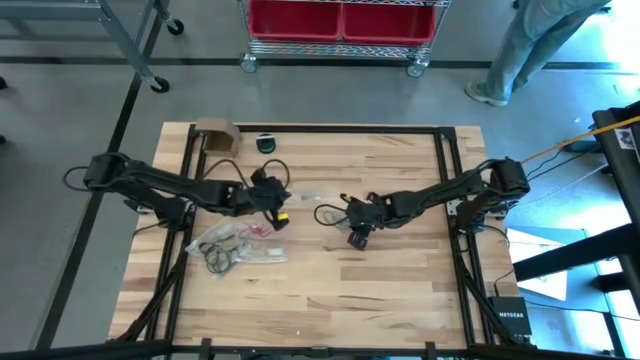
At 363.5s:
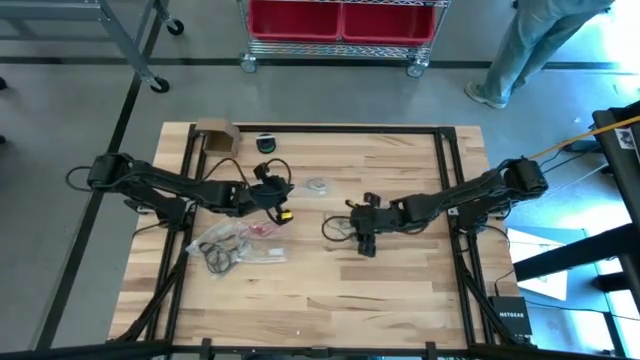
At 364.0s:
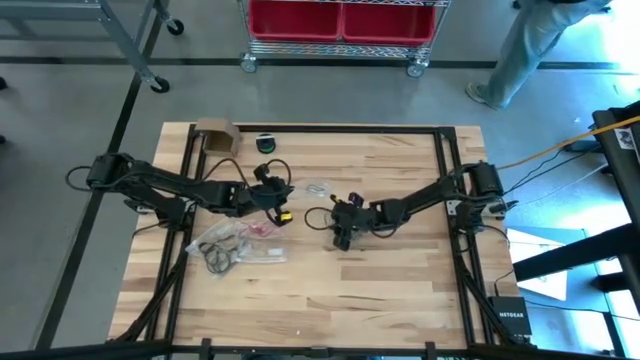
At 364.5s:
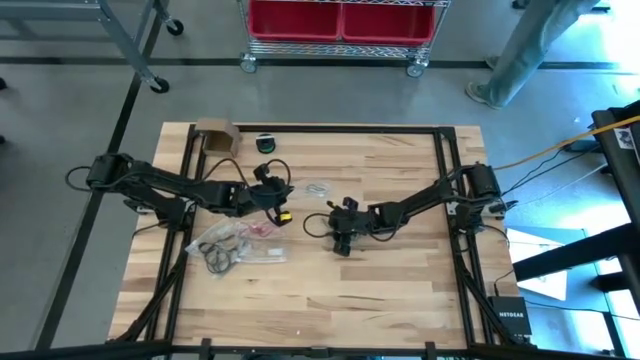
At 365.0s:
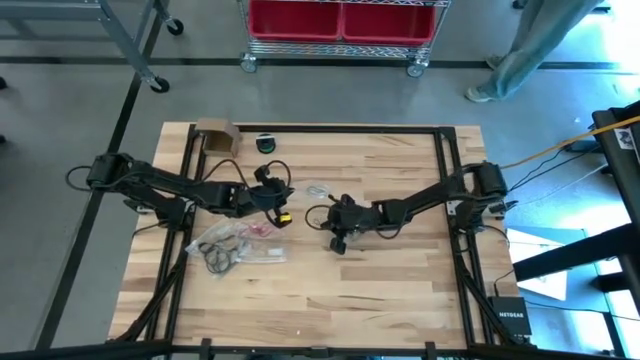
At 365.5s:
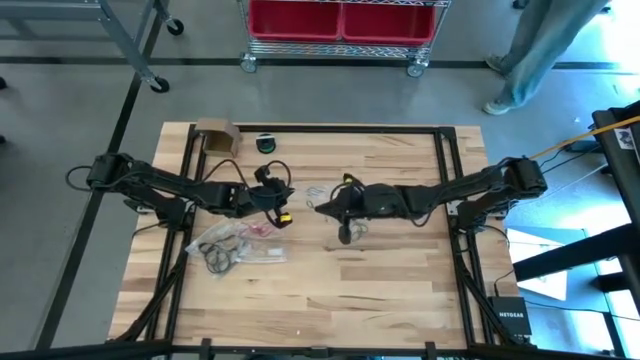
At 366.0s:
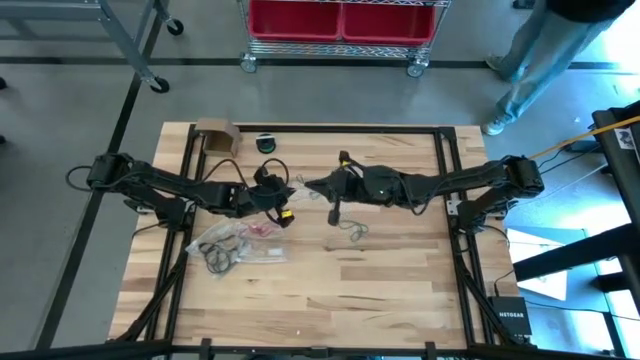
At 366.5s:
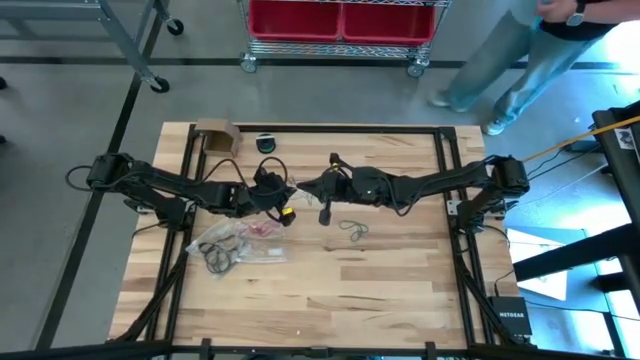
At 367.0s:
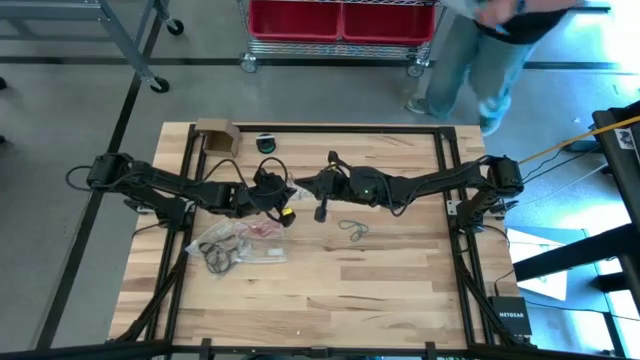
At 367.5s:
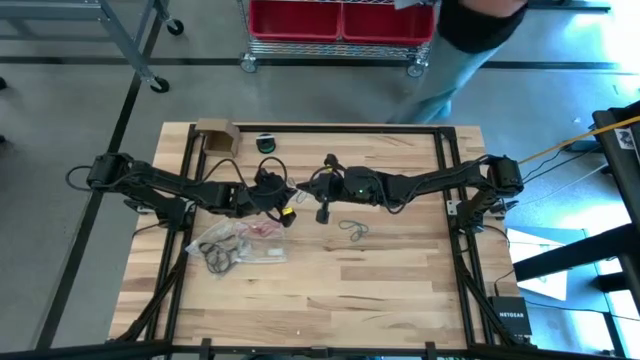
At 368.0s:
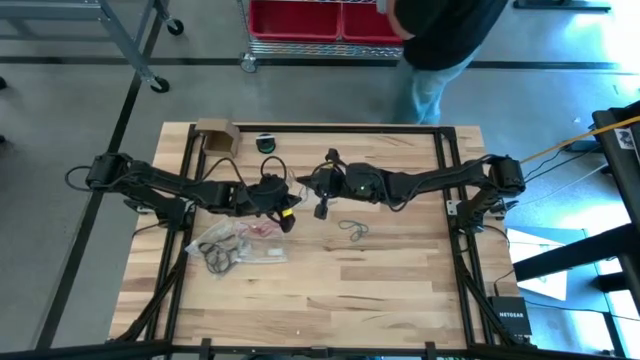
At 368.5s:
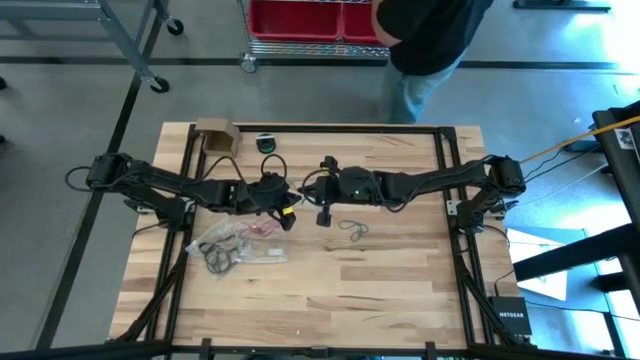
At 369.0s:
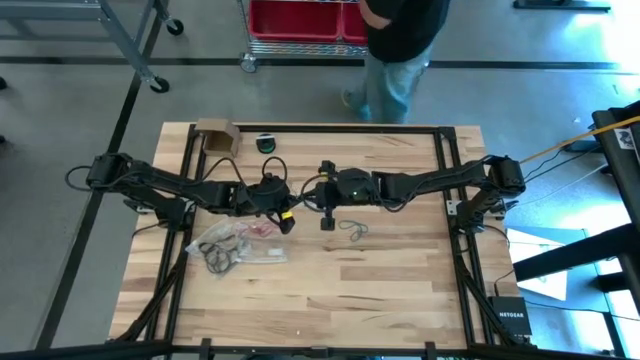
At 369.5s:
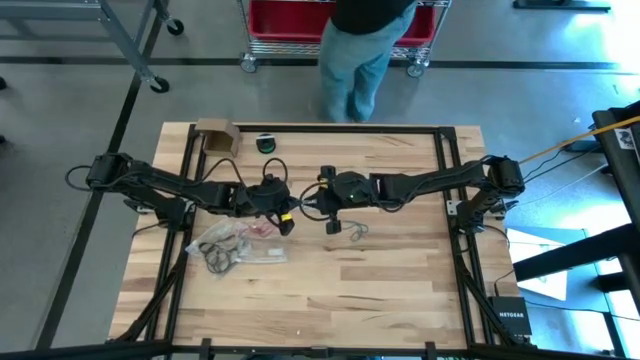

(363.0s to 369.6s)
Task: Sort rubber bands
Put the blue rubber band into the transparent zip bag

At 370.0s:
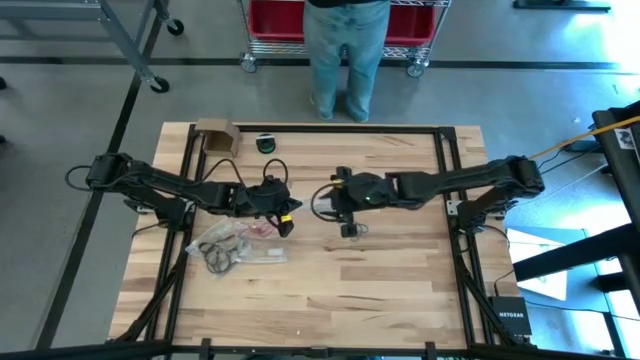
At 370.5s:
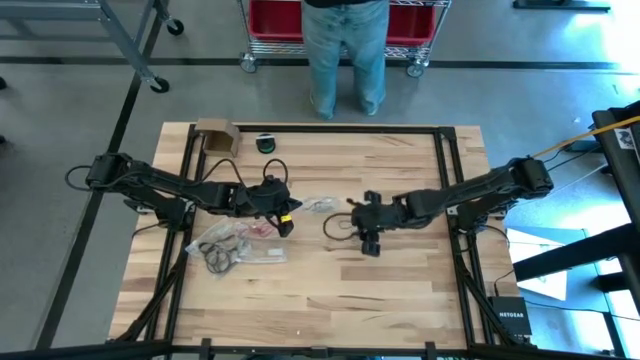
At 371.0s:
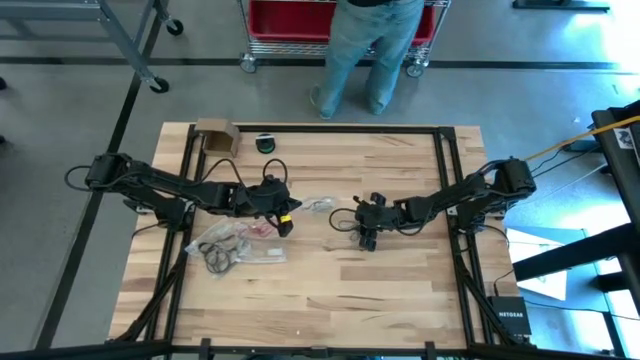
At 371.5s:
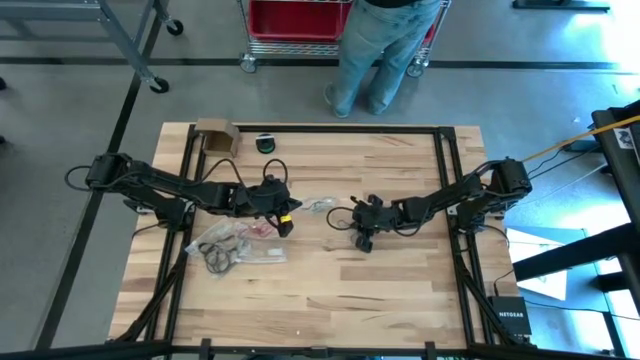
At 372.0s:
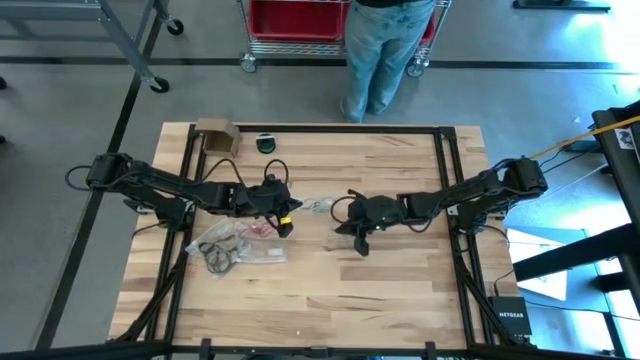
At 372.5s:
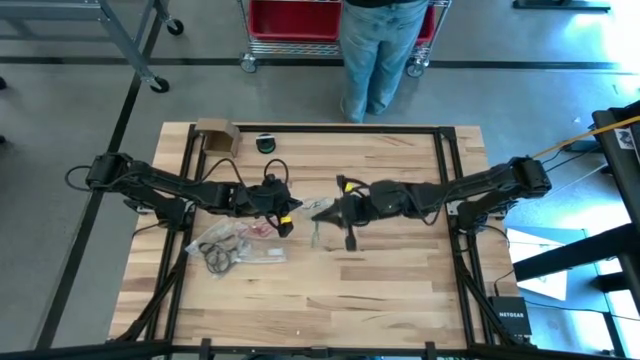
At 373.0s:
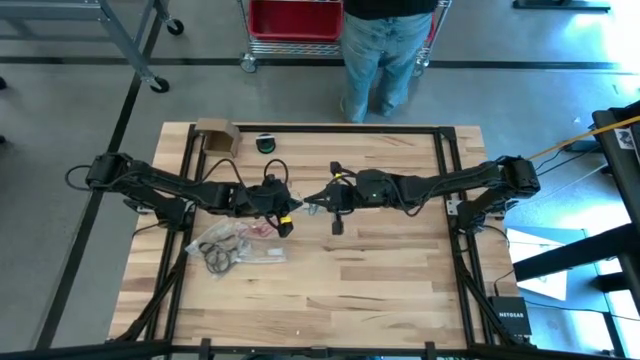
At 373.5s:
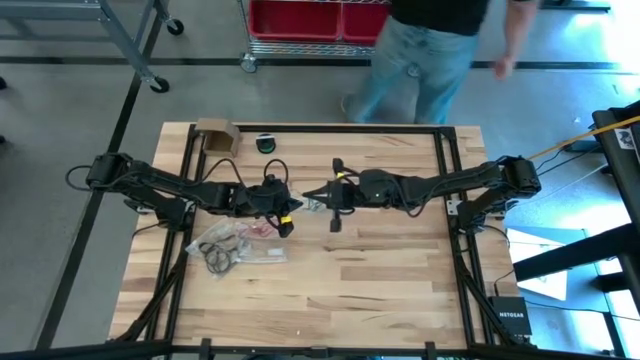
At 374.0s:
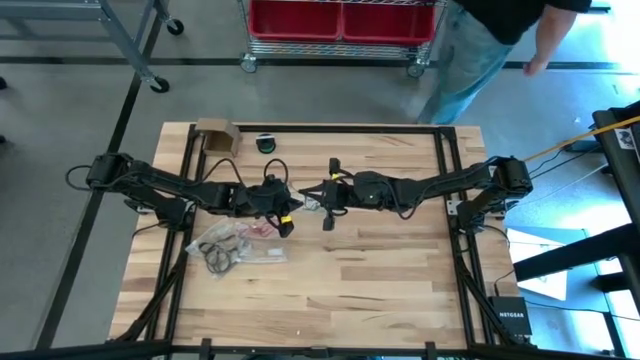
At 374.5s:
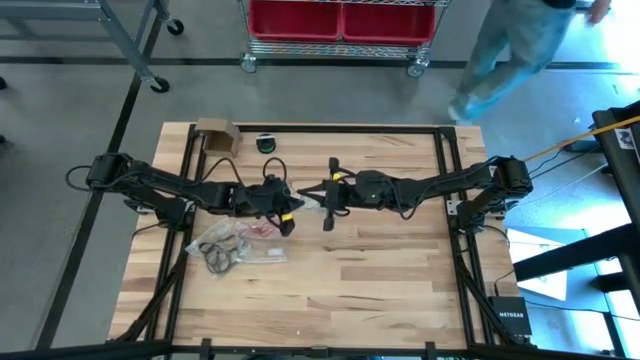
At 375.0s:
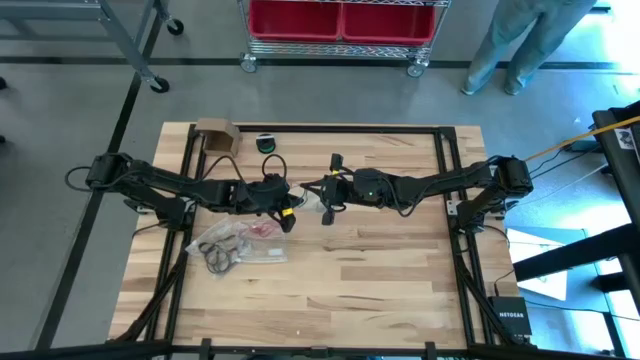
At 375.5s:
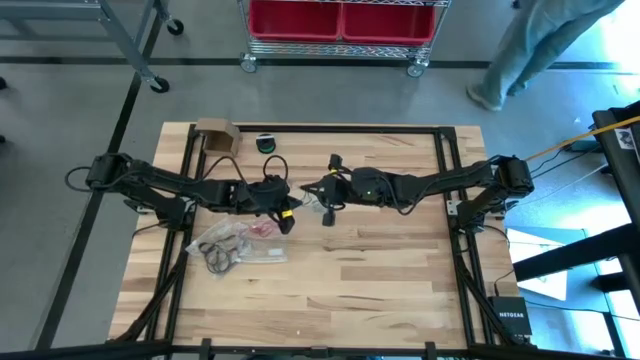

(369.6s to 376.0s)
Put the blue rubber band into the transparent zip bag

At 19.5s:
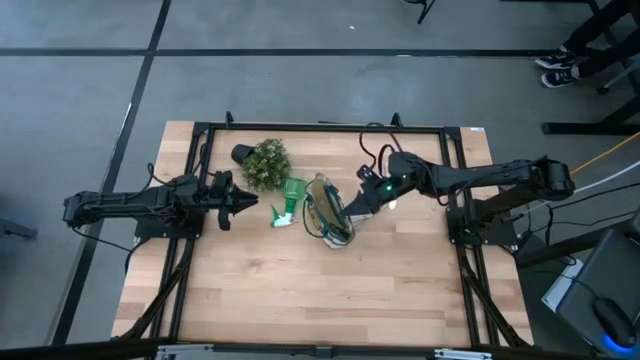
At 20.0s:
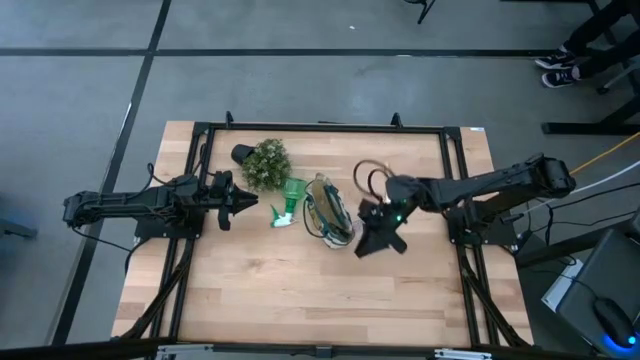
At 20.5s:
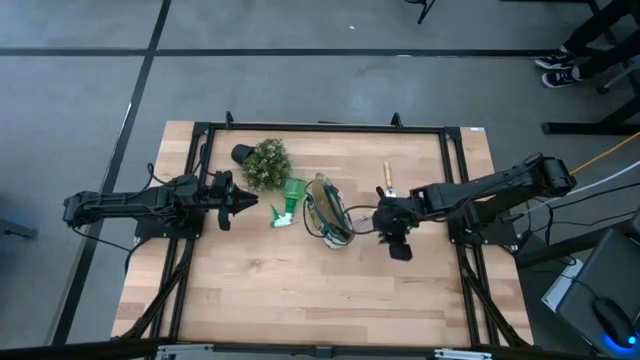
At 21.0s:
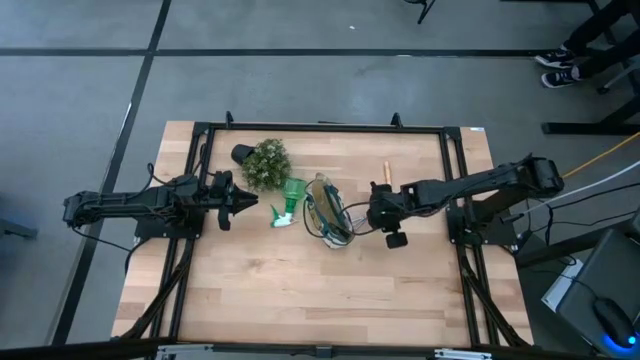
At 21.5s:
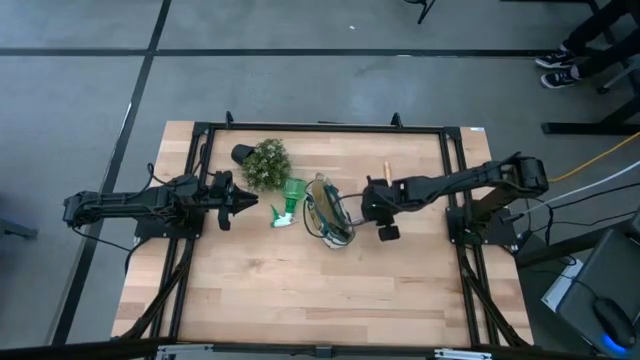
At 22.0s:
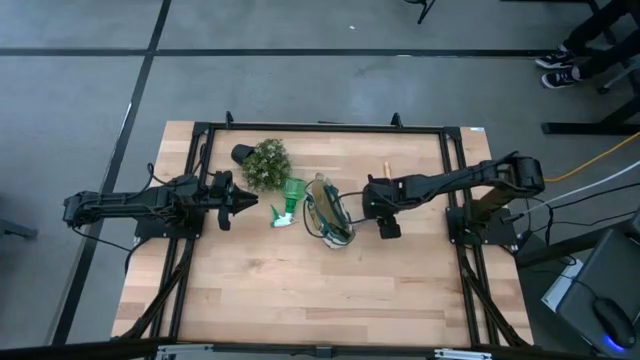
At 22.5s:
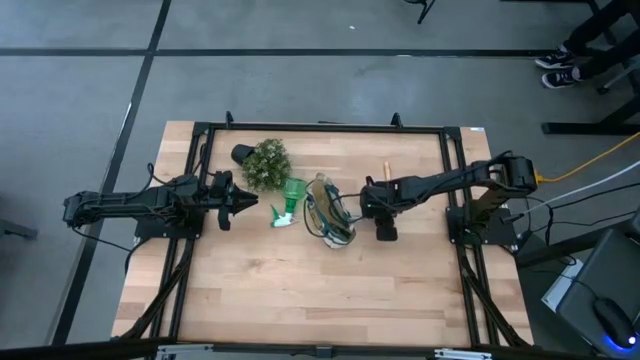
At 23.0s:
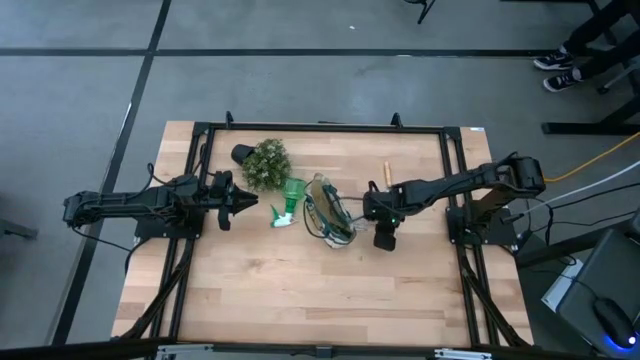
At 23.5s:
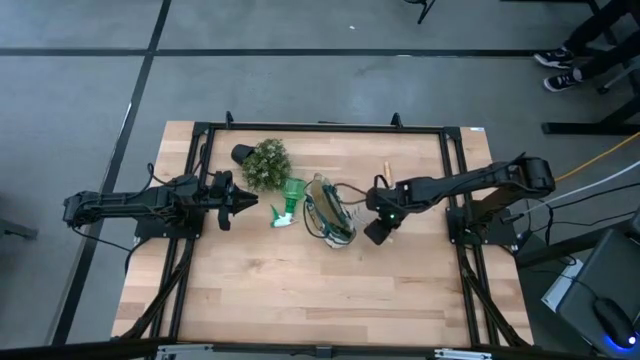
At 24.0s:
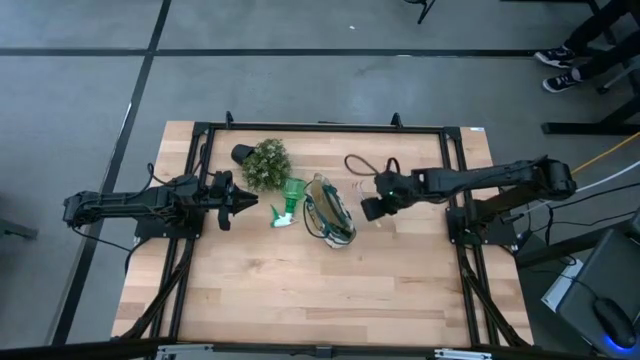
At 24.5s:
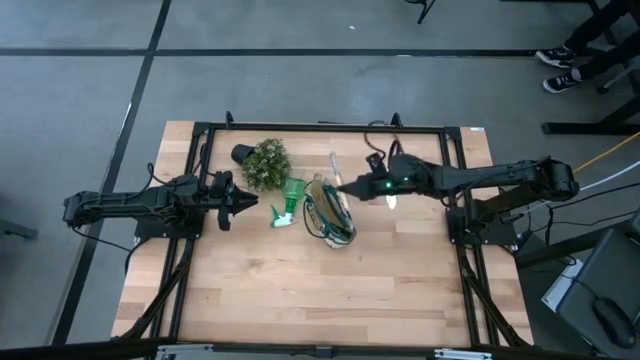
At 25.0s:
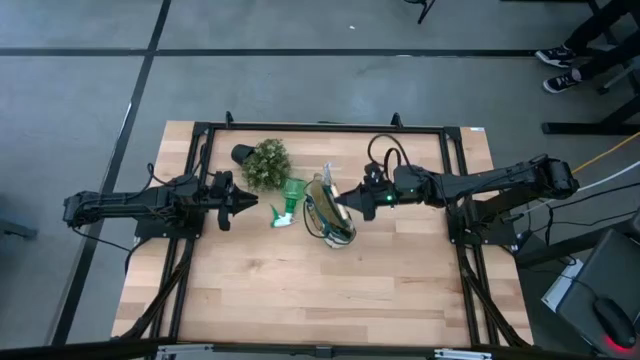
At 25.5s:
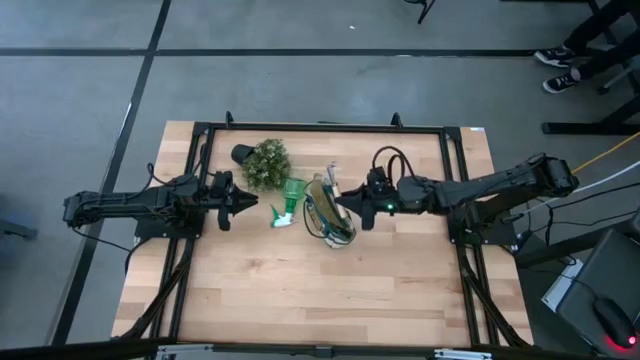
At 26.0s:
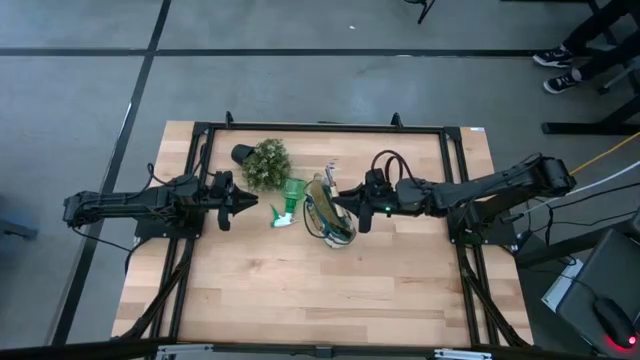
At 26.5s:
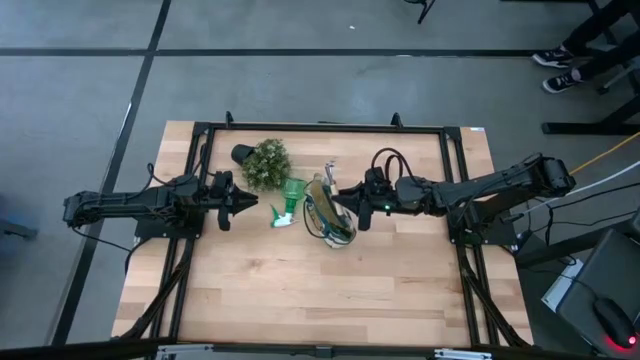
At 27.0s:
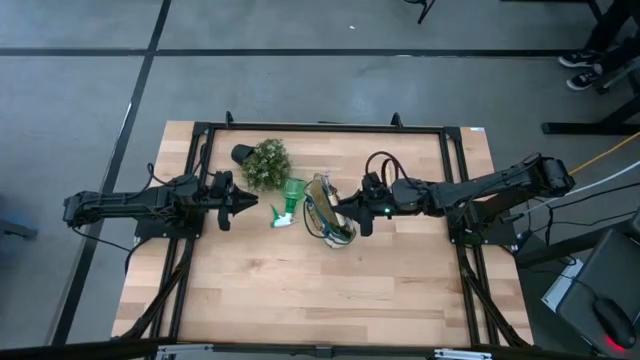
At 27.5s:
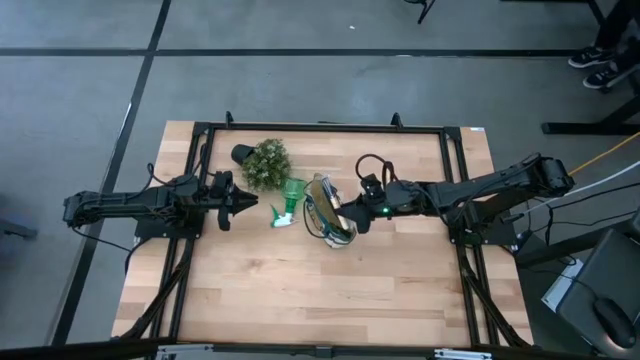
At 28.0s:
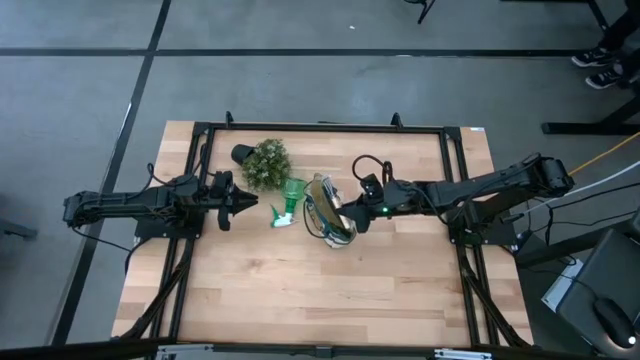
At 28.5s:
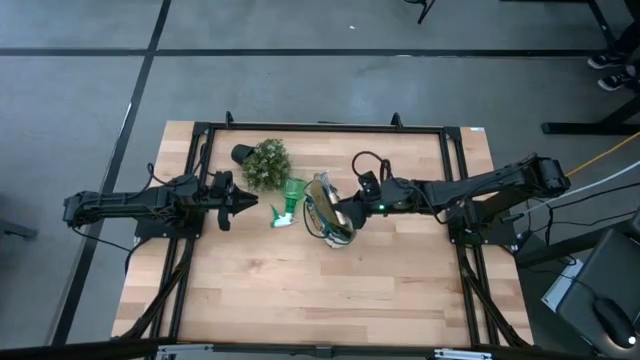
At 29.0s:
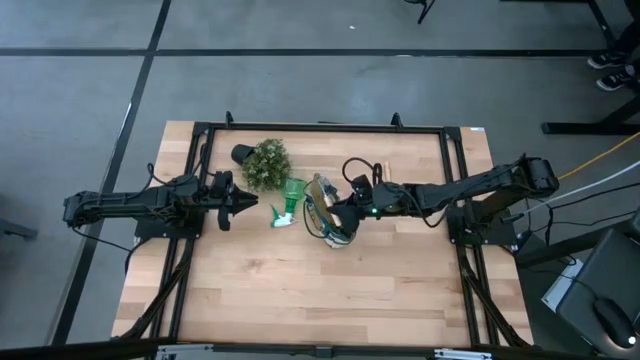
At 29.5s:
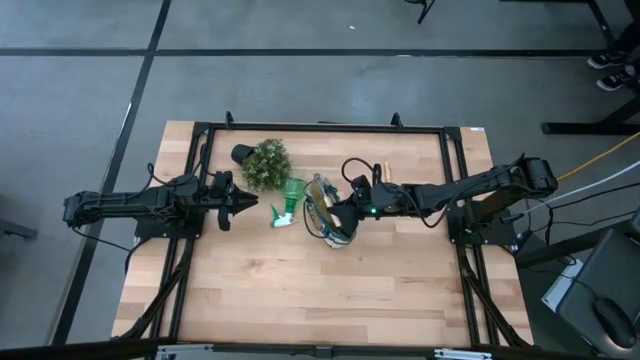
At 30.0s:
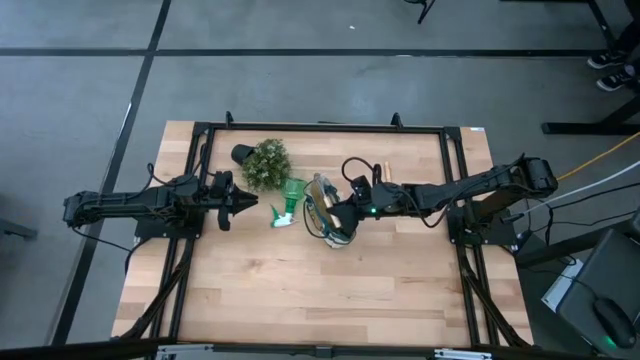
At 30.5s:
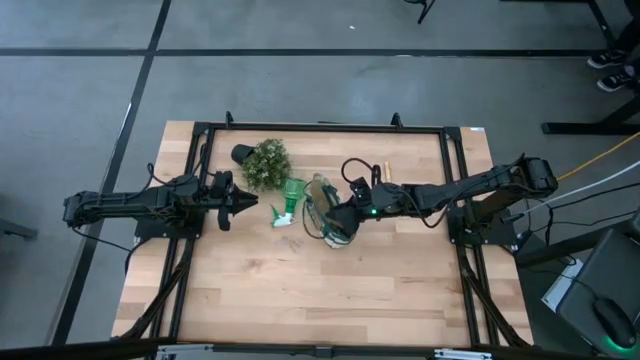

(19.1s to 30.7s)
Task: Pick & Place Garden tools in Gardening bag
Put the light brown hand rake into the light brown gardening bag
